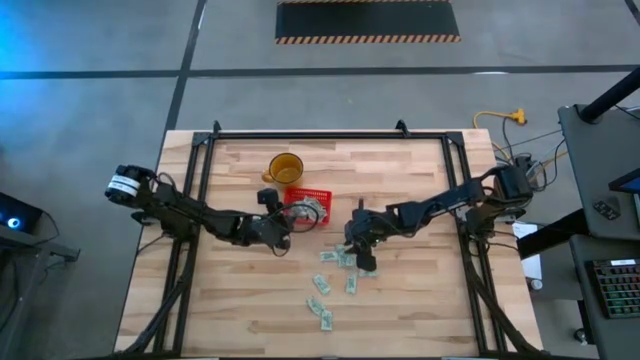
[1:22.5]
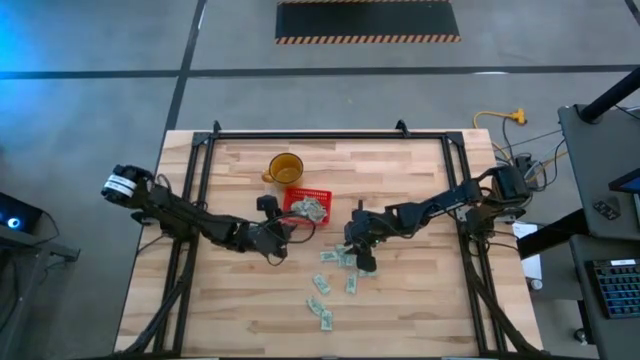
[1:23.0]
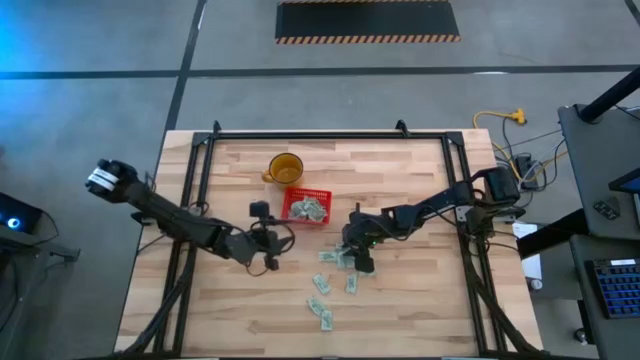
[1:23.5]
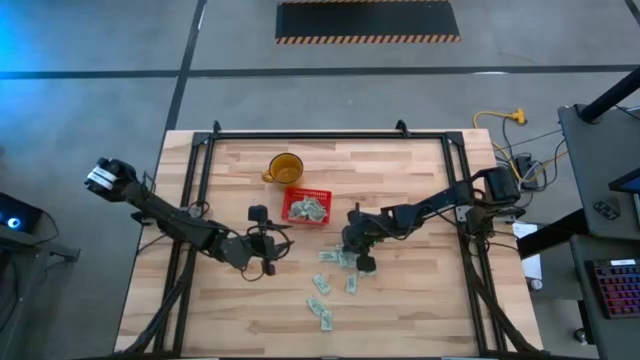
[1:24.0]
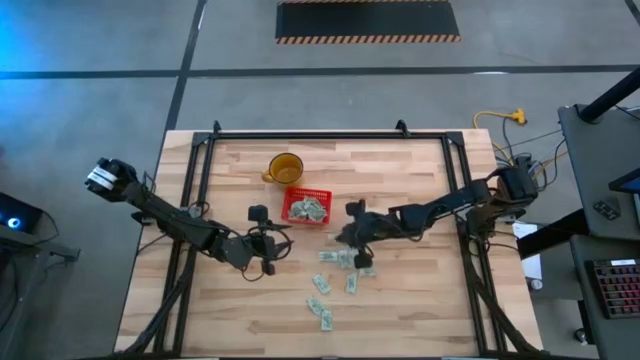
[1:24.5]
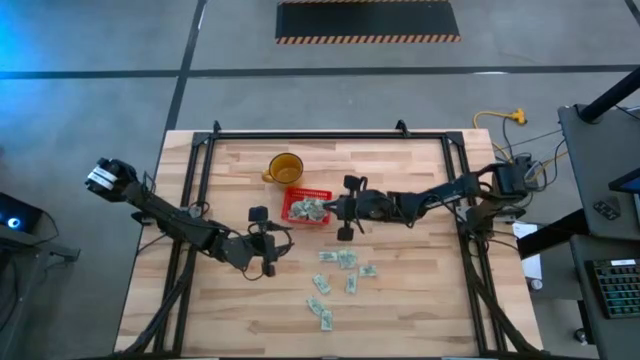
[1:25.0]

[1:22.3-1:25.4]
Task: Pick and place Stevia / Truvia into bins
Put the gray stevia packet into the red basket

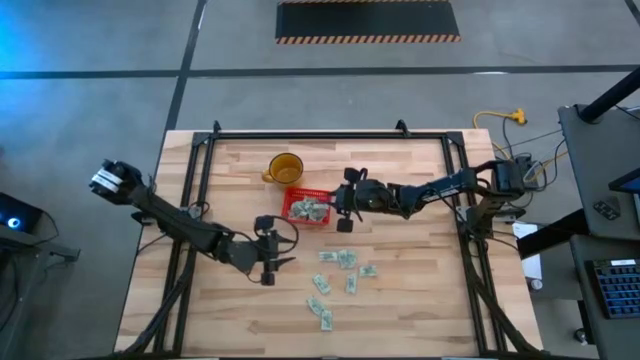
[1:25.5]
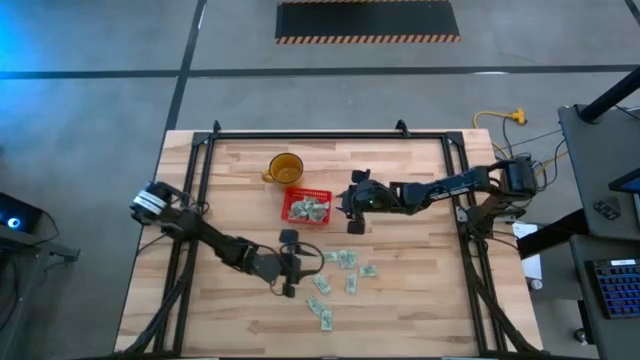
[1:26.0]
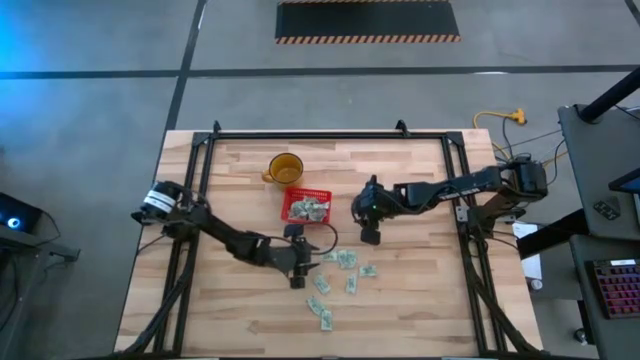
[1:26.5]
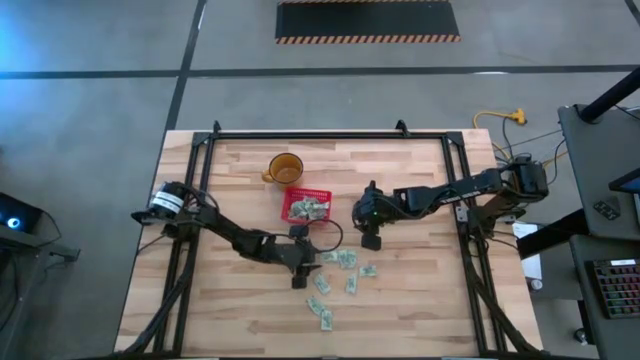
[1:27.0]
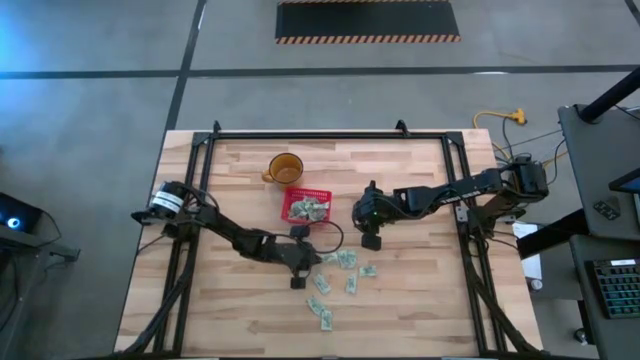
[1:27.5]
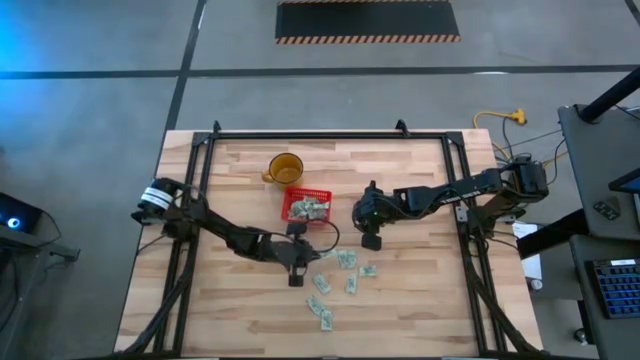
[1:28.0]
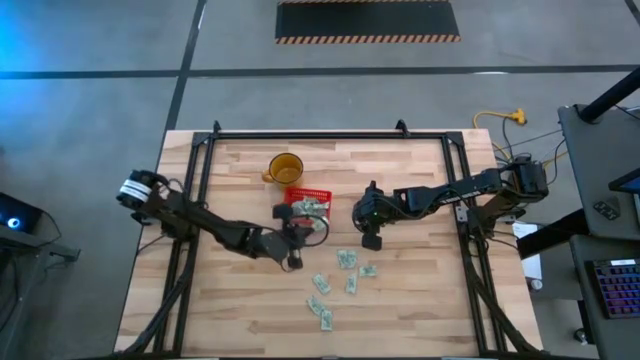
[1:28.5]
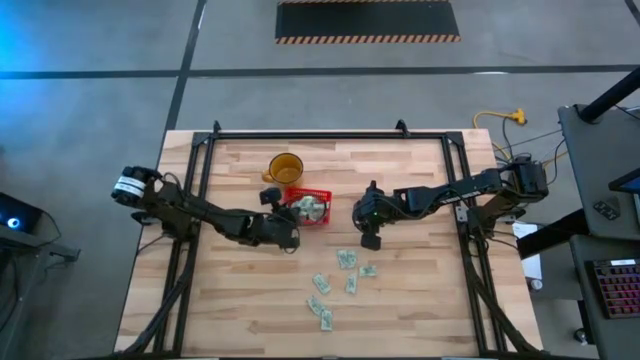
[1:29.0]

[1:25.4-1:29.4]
Put the gray stevia packet into the red basket

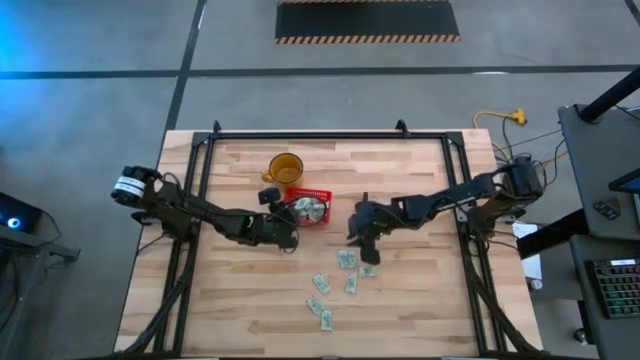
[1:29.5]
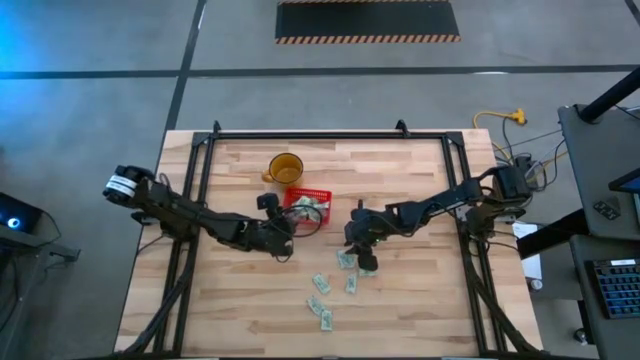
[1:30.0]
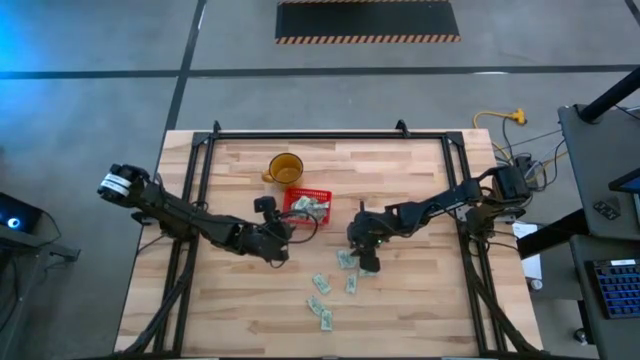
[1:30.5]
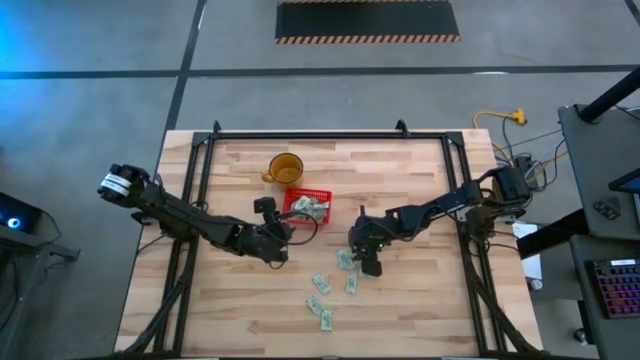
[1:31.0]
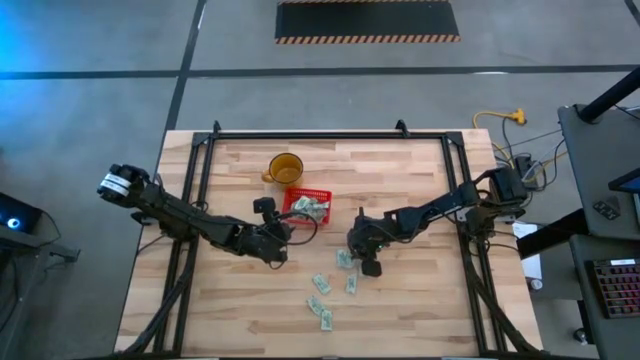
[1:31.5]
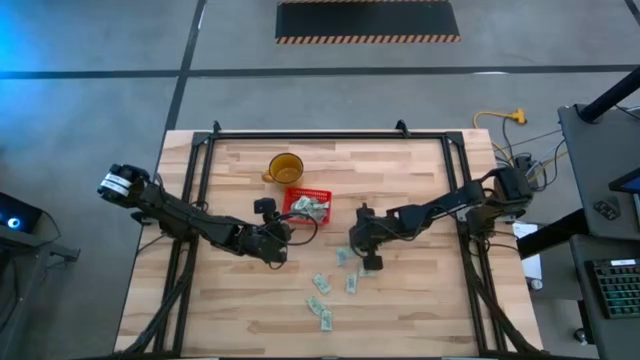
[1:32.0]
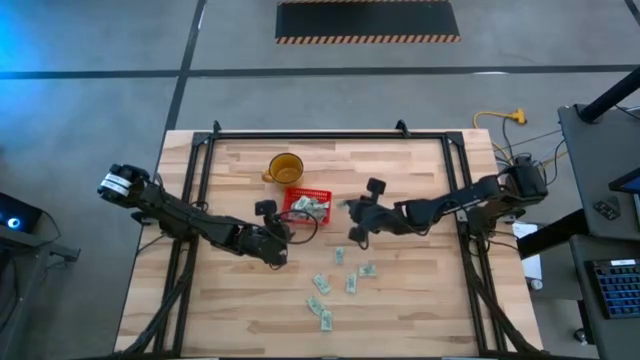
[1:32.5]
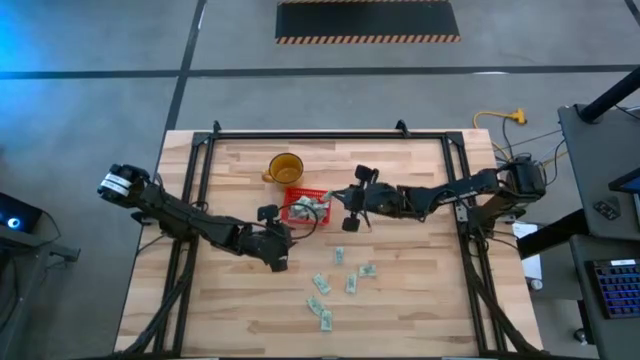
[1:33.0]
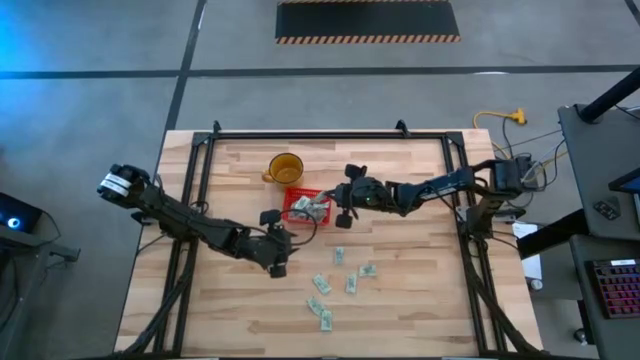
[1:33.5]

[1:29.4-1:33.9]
Put the gray stevia packet into the red basket

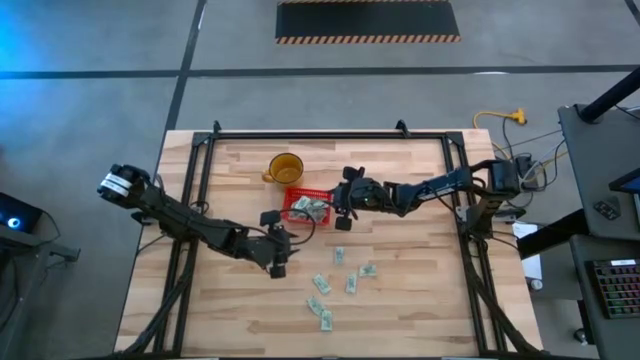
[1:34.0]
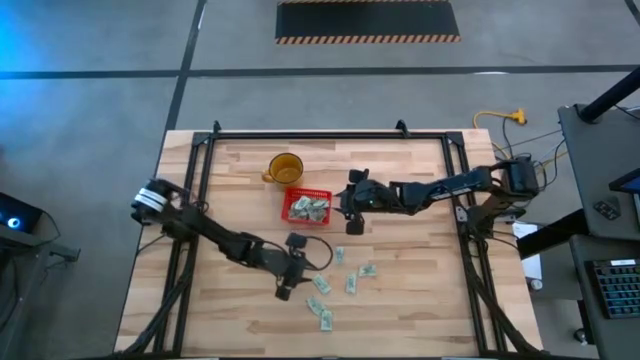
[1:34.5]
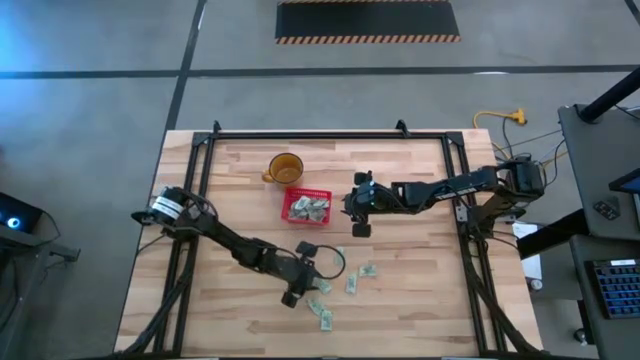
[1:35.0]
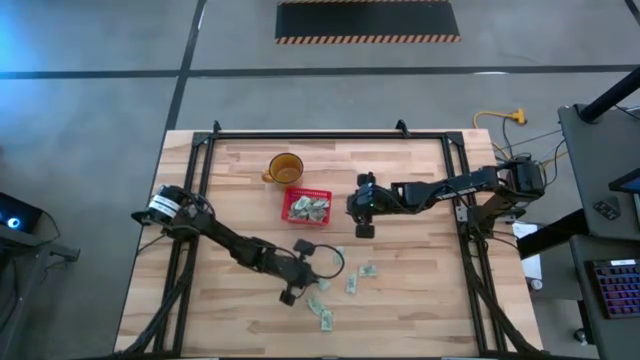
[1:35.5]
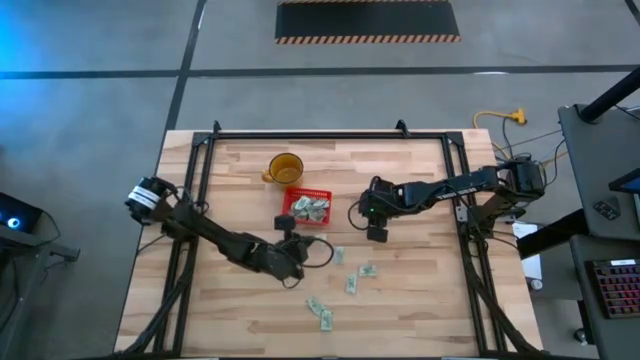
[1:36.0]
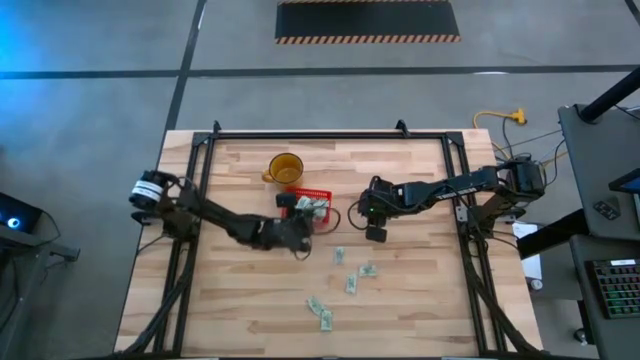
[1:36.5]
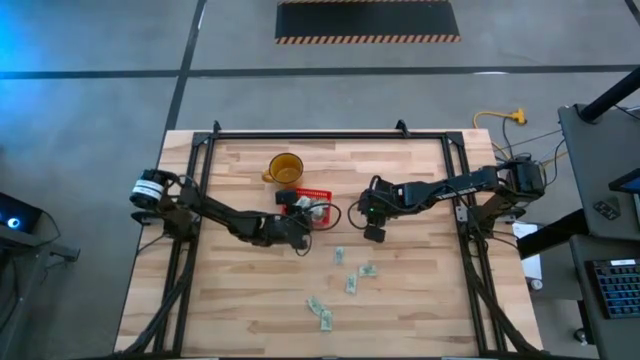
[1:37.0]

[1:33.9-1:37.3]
Put the gray stevia packet into the red basket

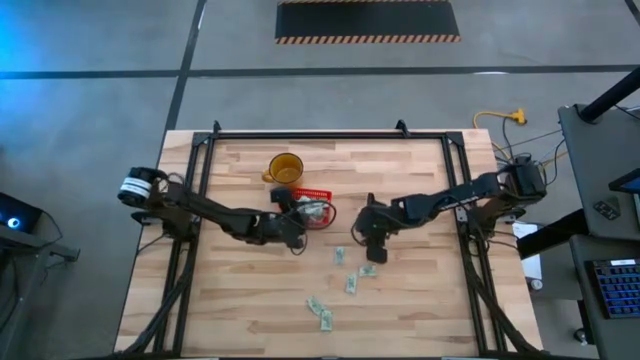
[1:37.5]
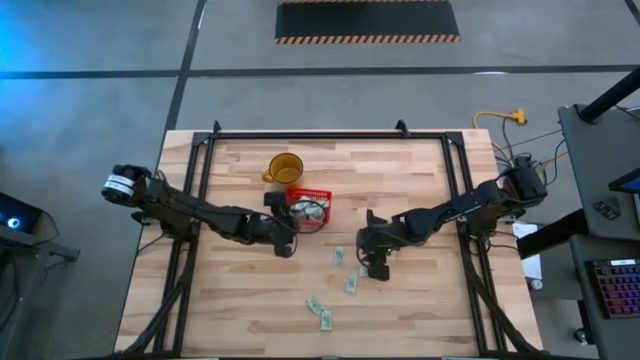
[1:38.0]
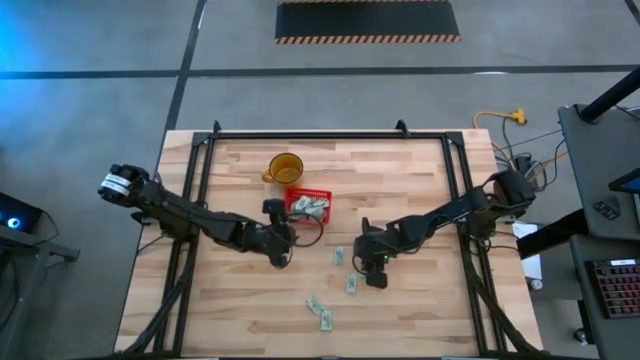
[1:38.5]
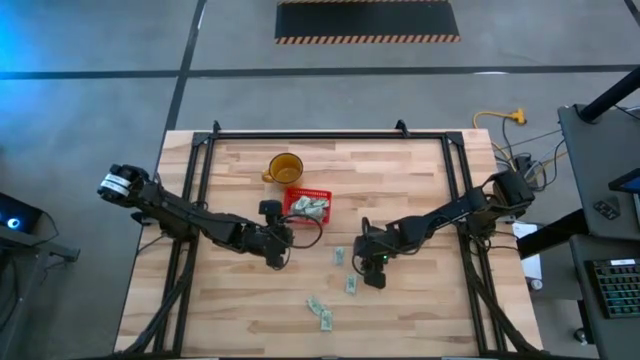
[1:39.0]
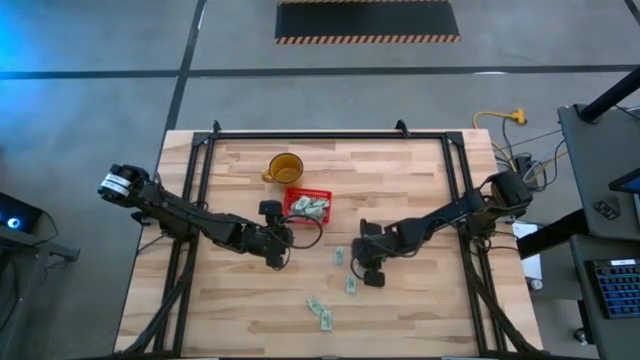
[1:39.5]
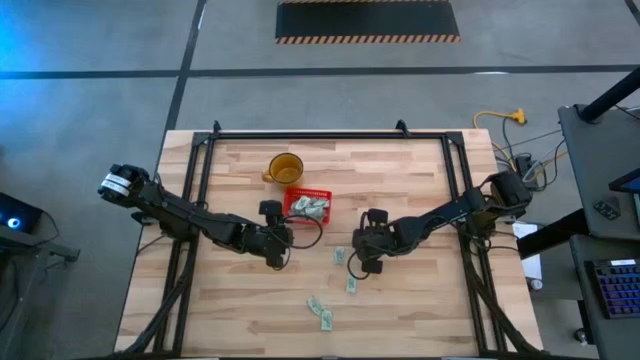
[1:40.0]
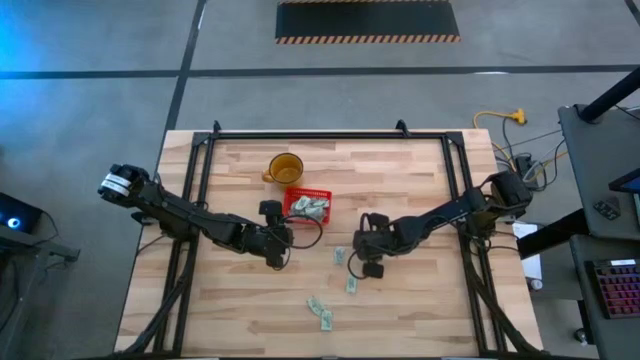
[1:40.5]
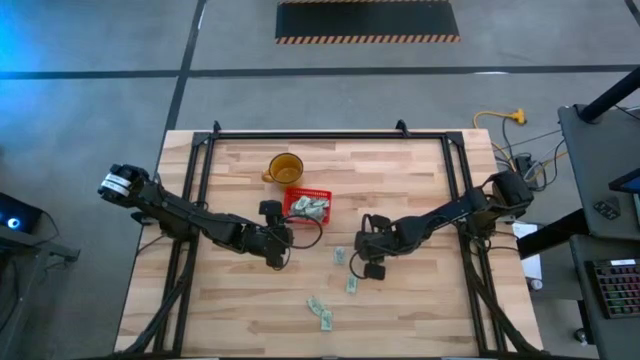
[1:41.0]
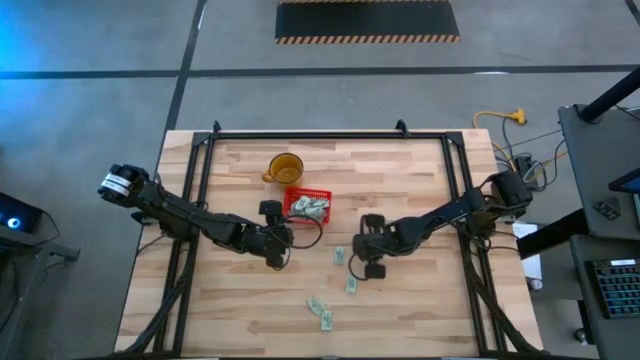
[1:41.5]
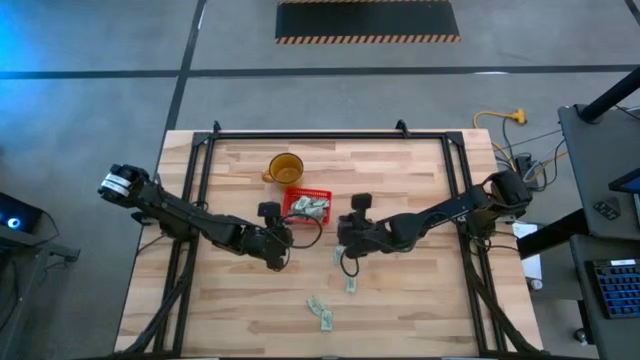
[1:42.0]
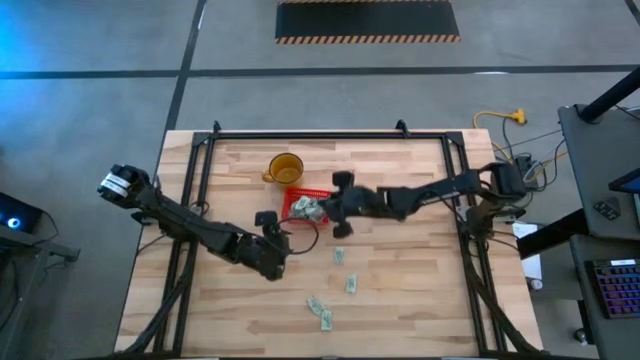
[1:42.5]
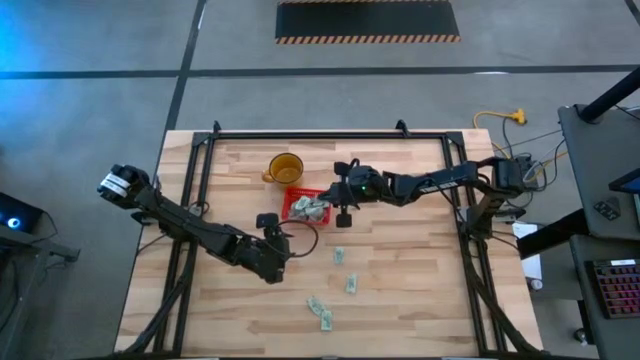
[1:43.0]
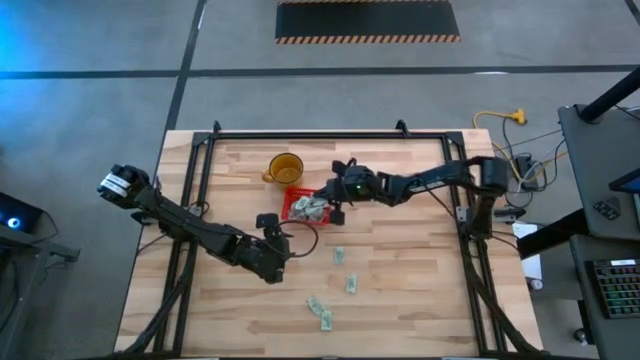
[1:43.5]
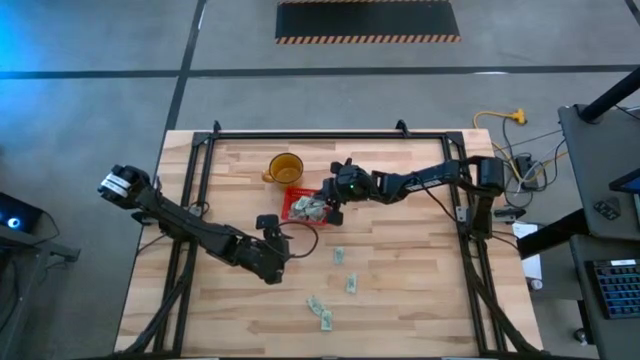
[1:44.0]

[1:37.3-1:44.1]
Put the gray stevia packet into the red basket
